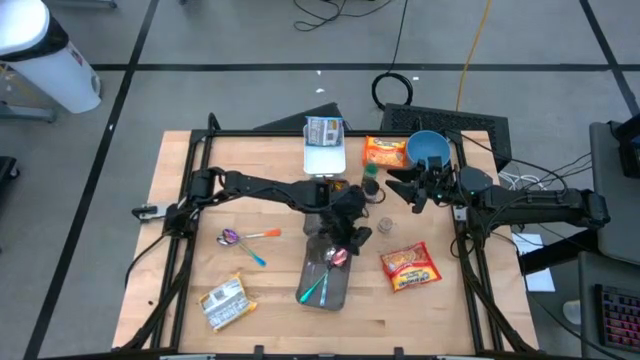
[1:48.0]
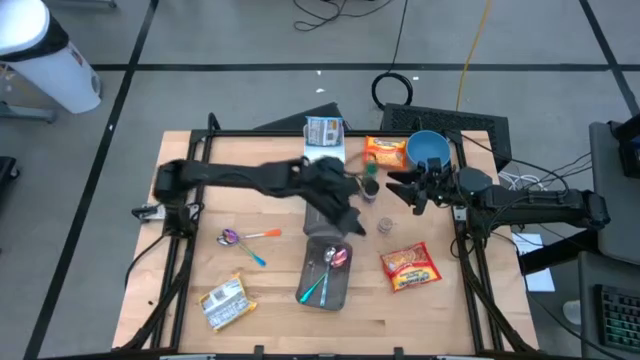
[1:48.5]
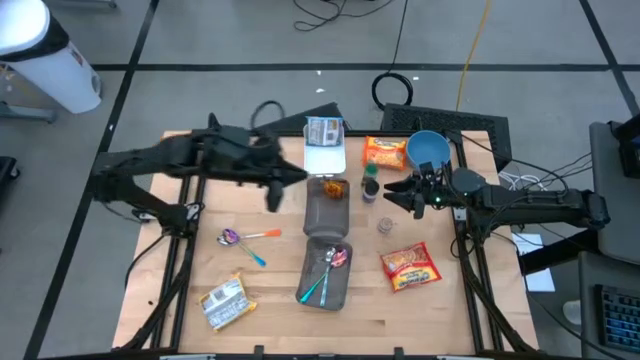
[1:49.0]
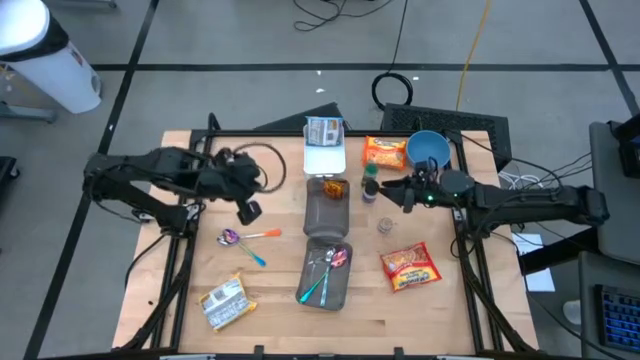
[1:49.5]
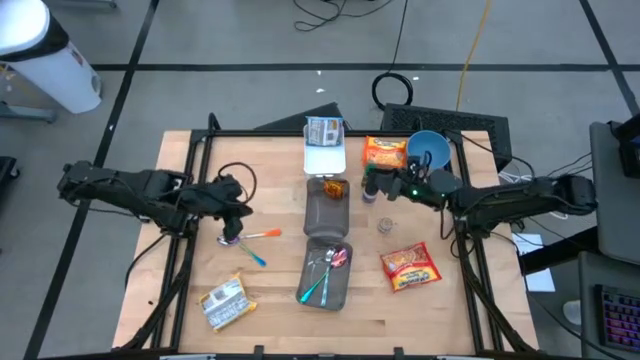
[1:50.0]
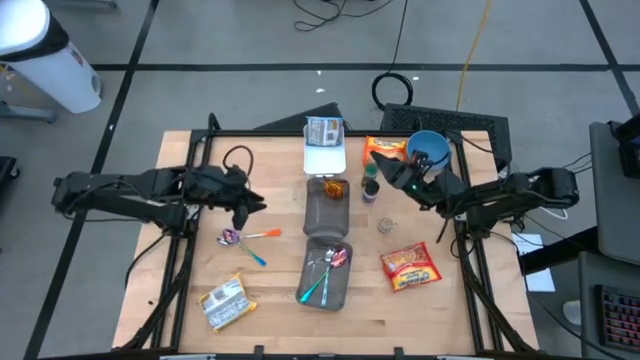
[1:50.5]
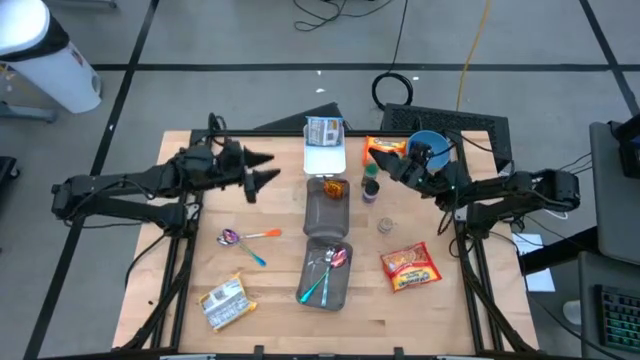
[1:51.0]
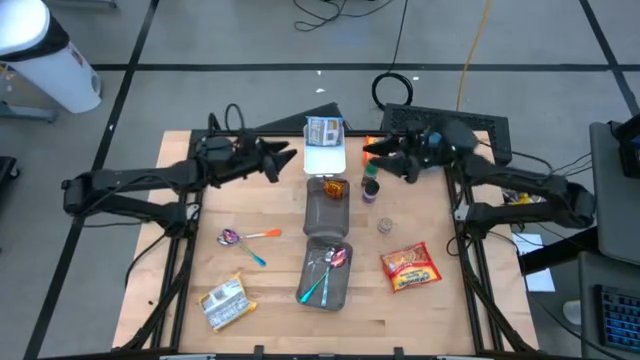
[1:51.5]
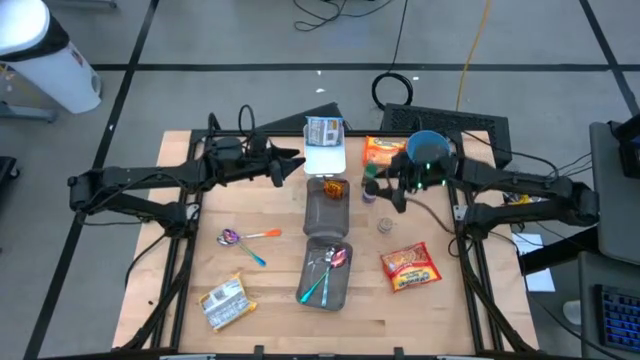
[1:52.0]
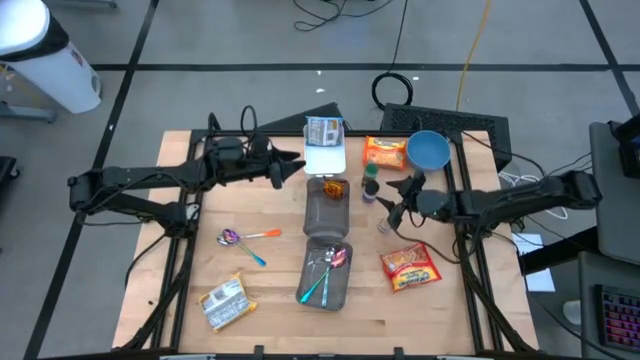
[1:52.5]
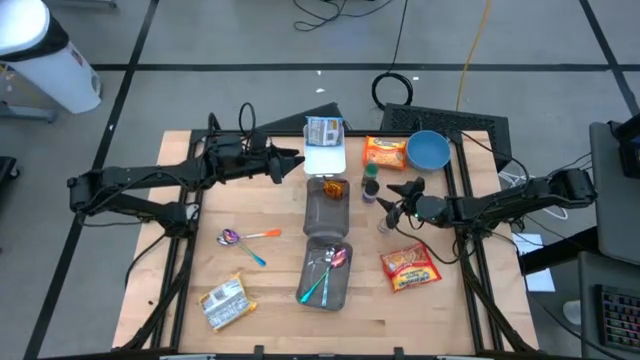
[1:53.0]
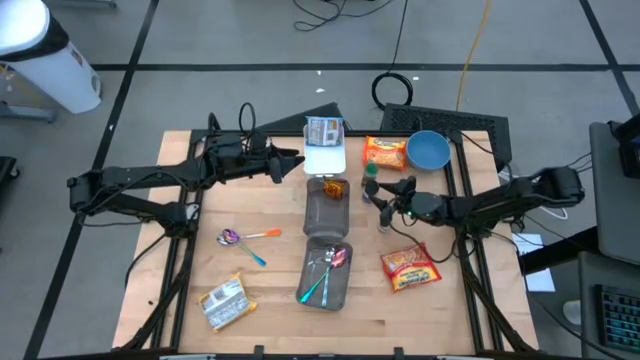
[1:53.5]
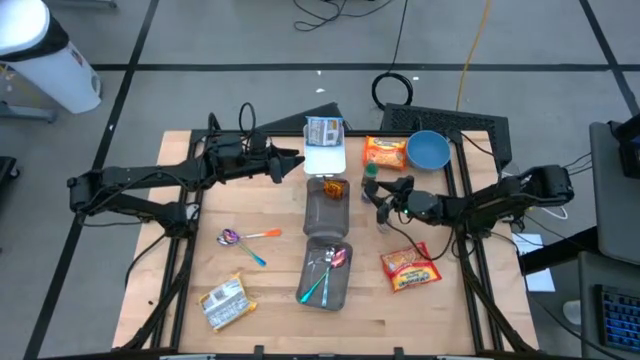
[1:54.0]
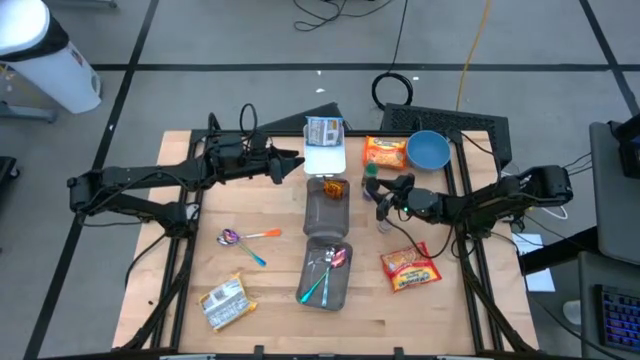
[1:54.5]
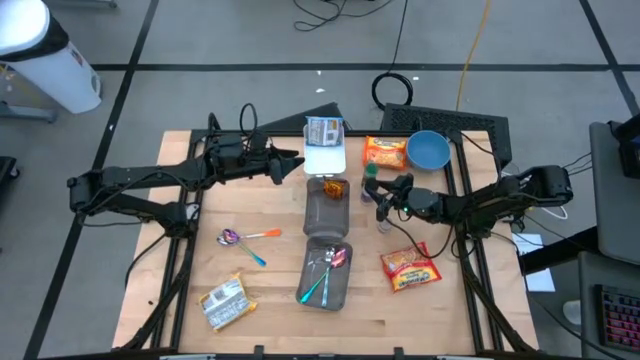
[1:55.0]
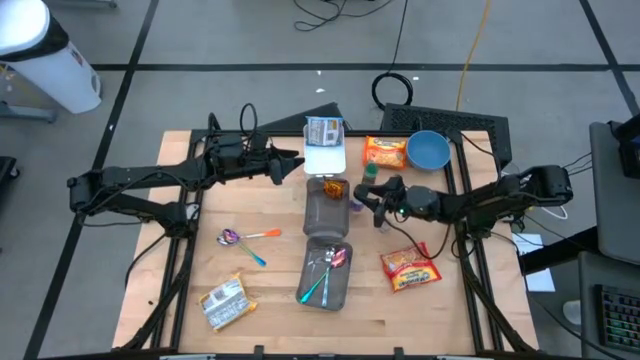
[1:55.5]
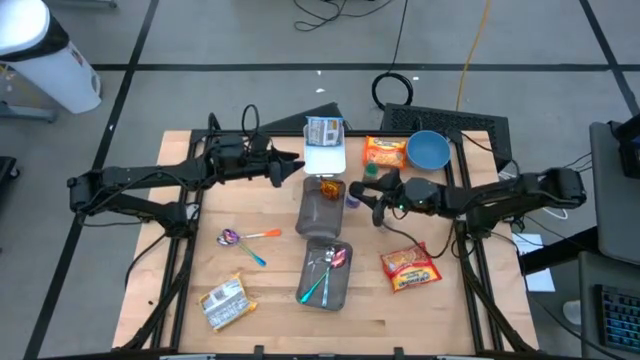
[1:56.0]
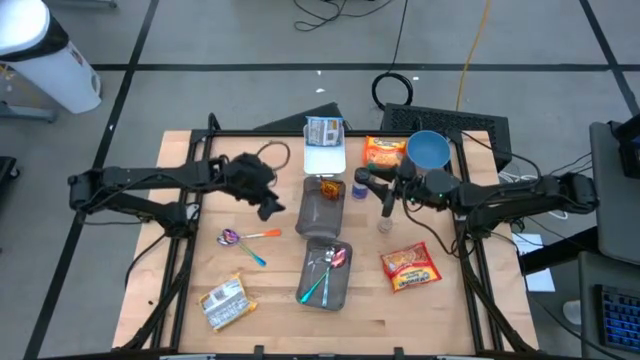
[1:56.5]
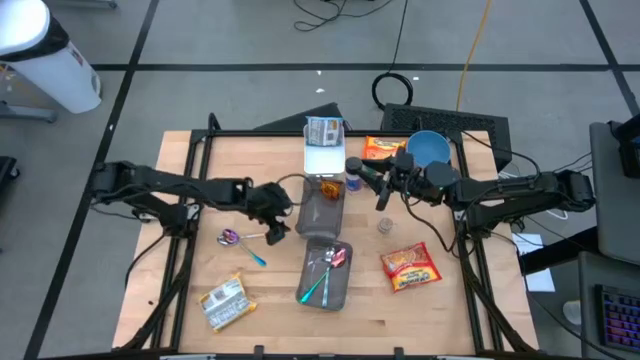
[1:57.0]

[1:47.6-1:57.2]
Task: Pick & Place Food Item
Put the black seasoning bottle into the top black bin

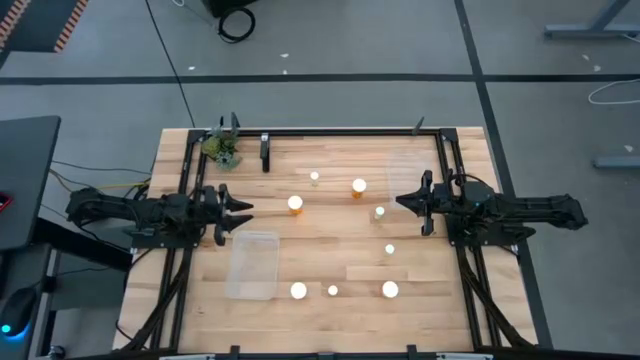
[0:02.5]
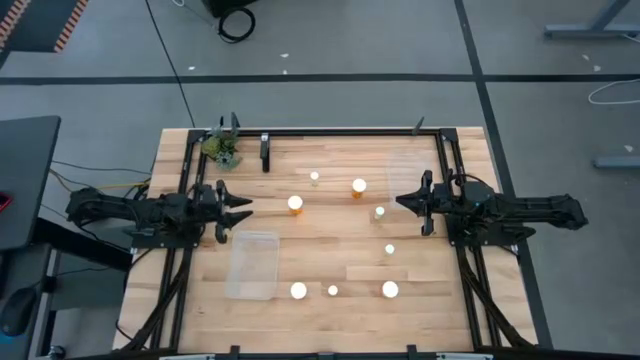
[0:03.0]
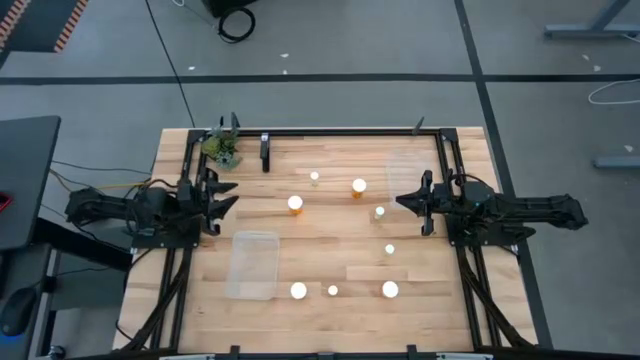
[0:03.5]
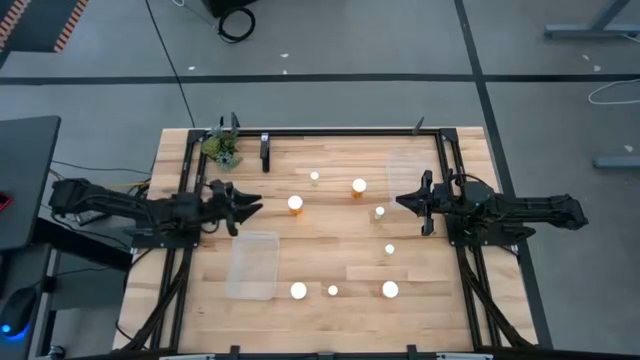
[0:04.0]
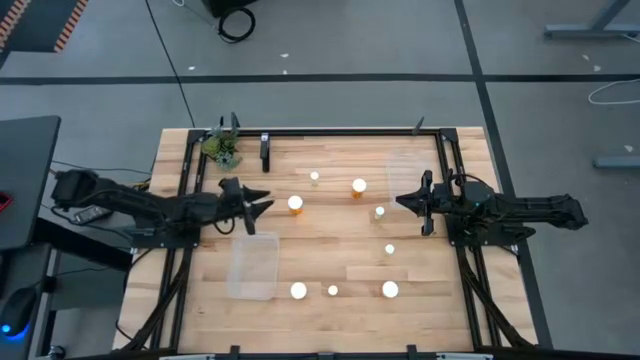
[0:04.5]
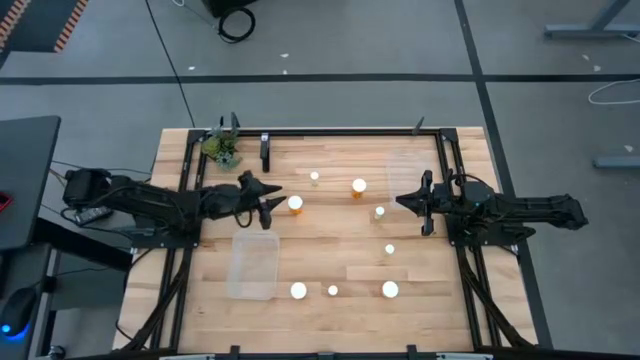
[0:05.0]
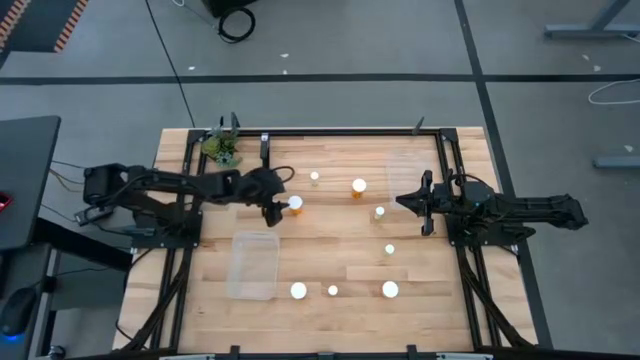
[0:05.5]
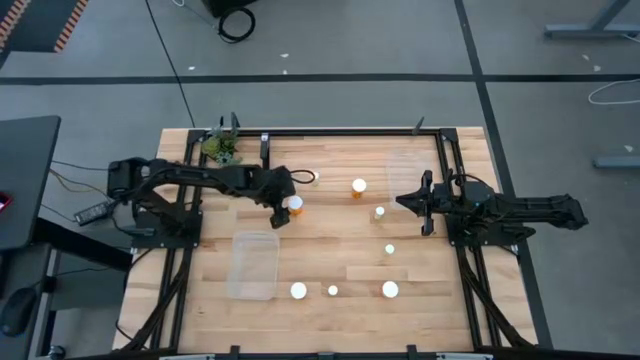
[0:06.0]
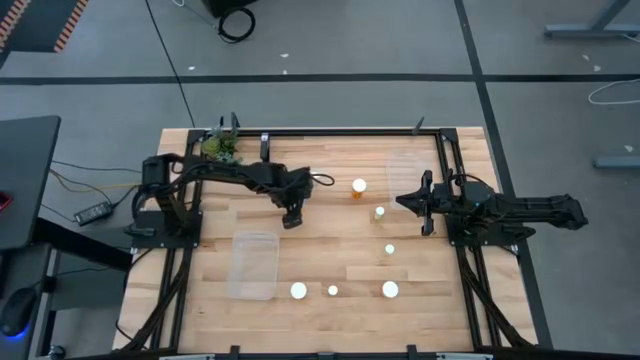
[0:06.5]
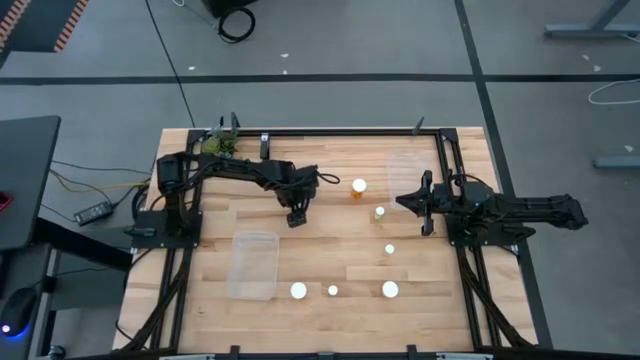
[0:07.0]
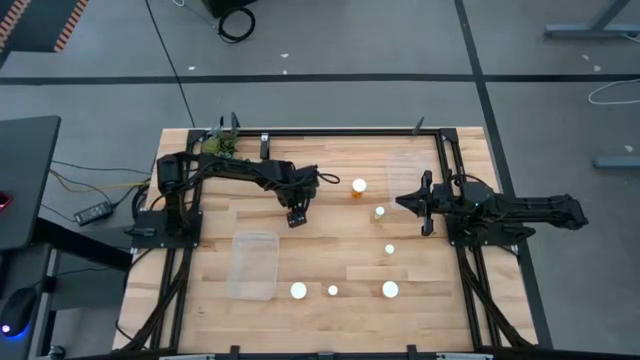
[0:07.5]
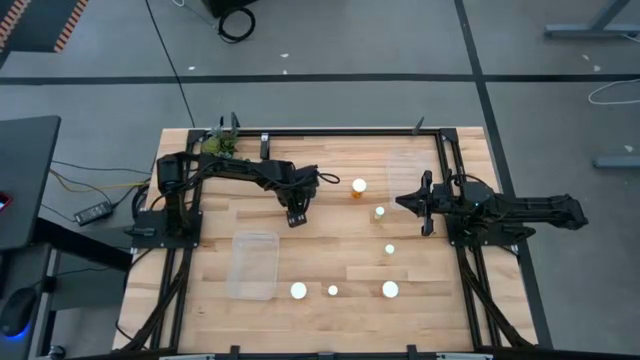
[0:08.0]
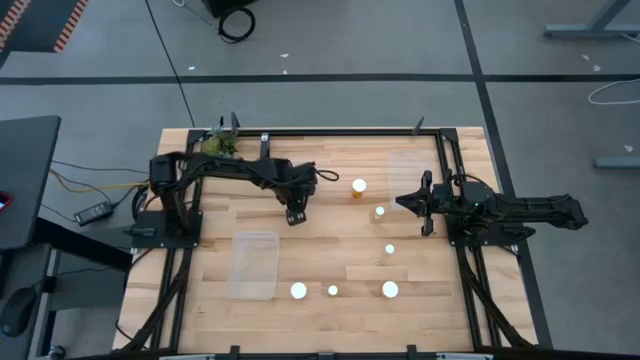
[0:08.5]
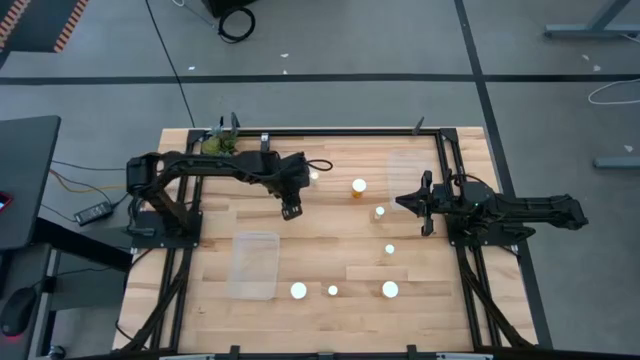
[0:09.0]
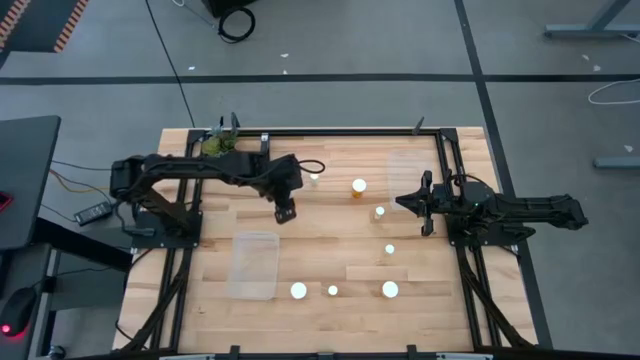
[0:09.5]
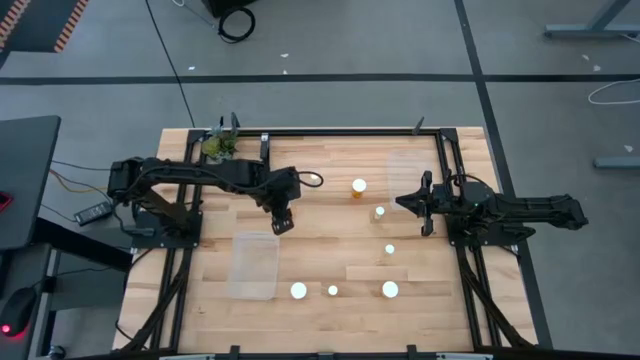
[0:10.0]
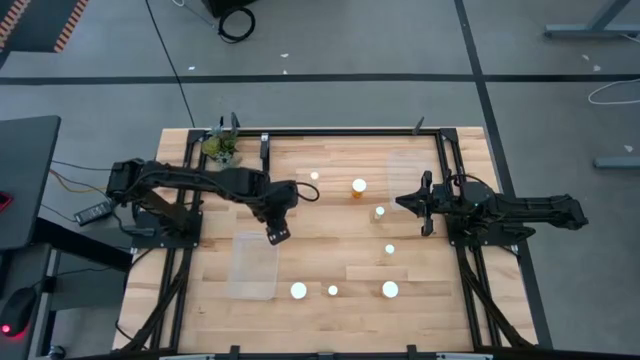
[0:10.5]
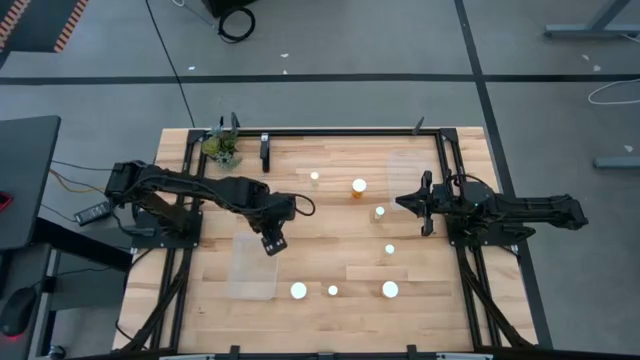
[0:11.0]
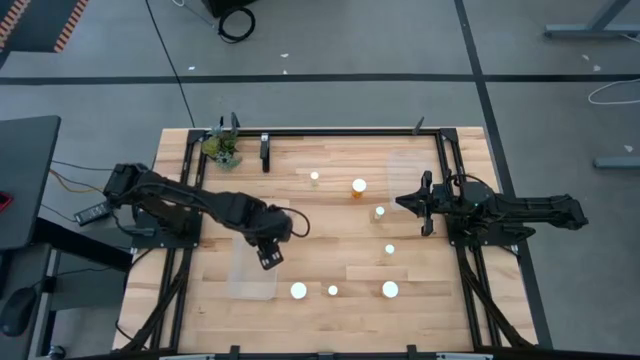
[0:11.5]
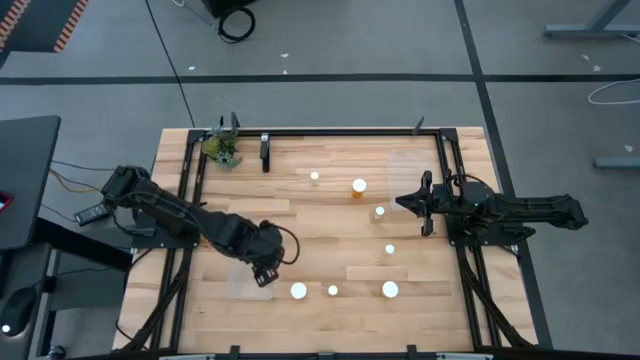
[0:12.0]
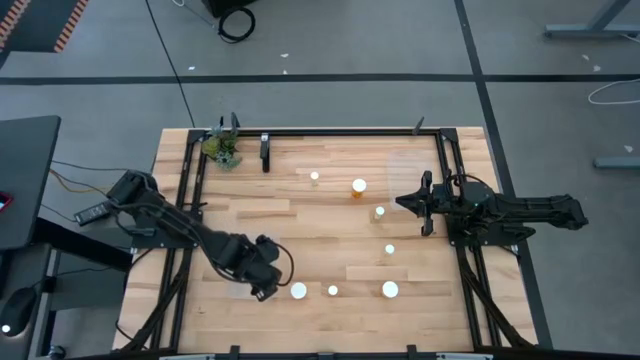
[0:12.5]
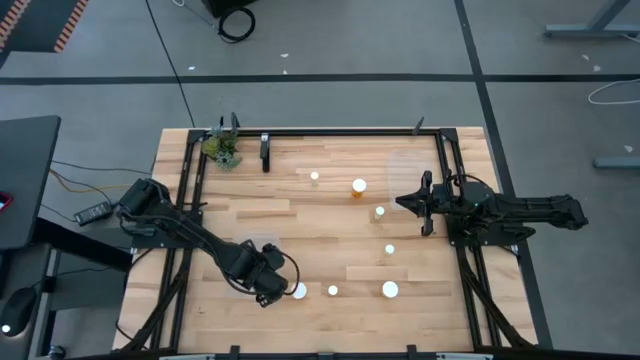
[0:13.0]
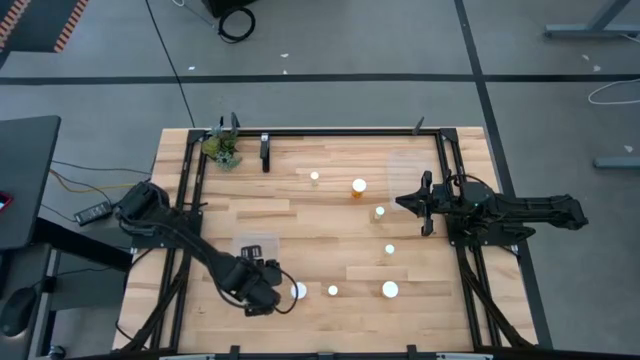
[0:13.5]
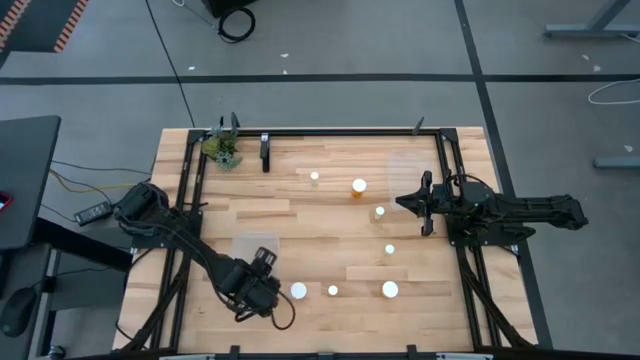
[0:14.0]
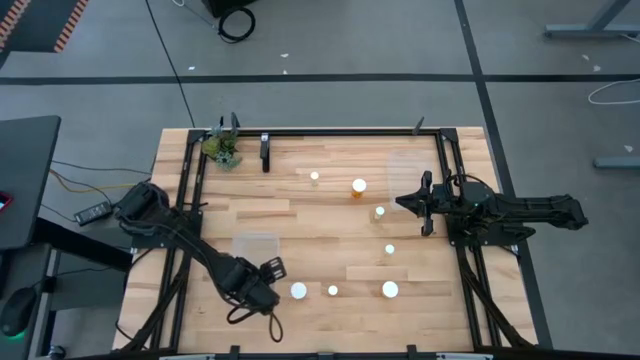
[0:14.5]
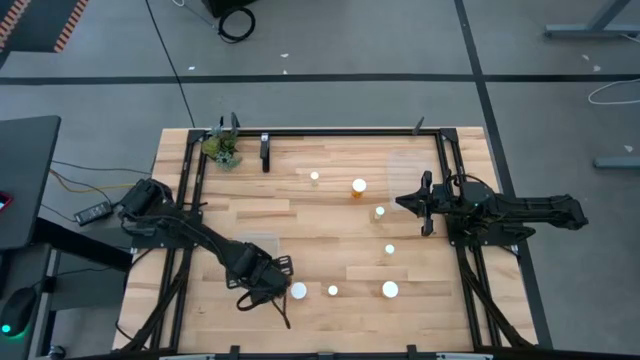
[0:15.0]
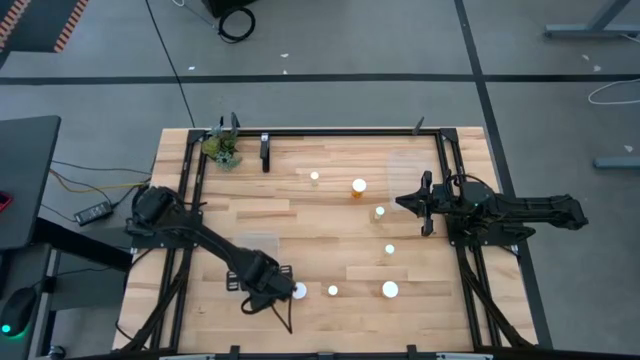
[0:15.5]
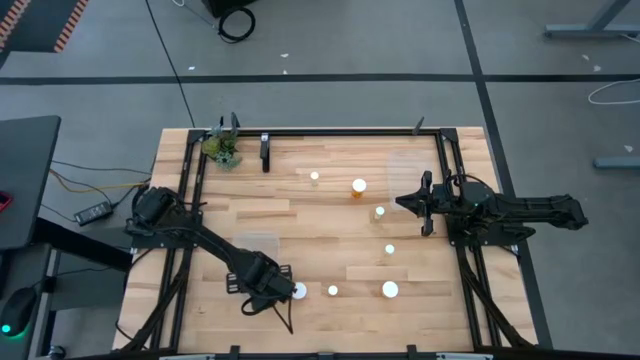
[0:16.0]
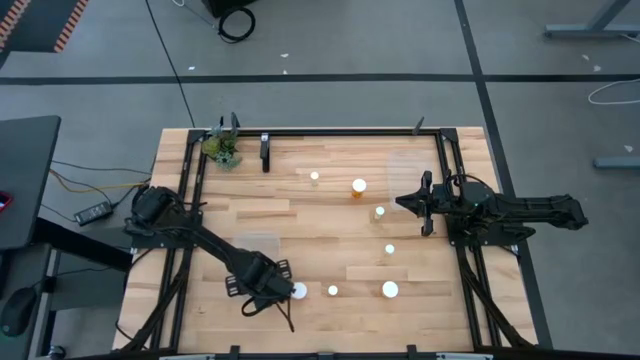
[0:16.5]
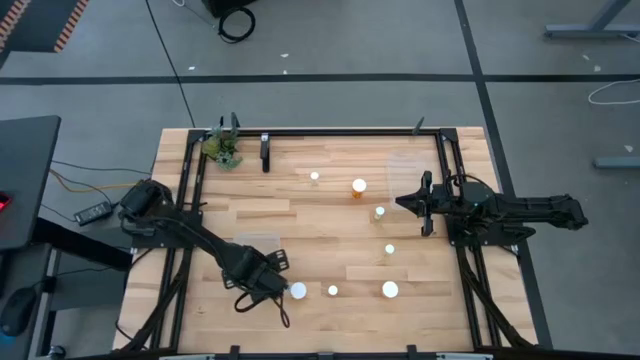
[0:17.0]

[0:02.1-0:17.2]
Task: Pick and place medicine bottles into bin by pill shape (circle, oval)
Put the large orange pill bottle into the bottom transparent bin
